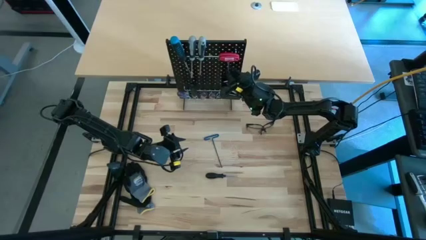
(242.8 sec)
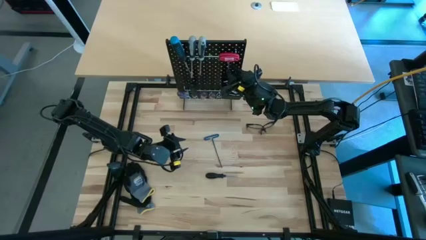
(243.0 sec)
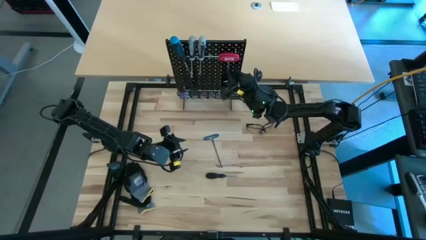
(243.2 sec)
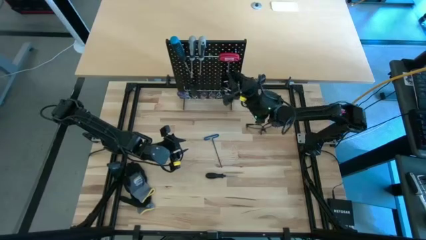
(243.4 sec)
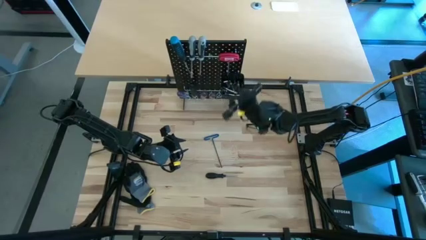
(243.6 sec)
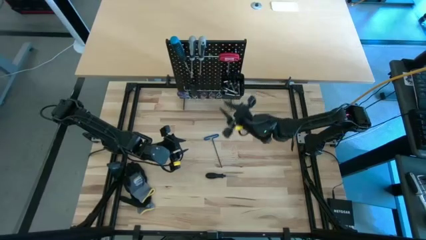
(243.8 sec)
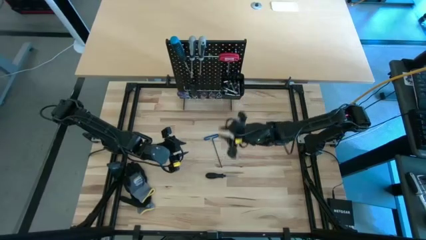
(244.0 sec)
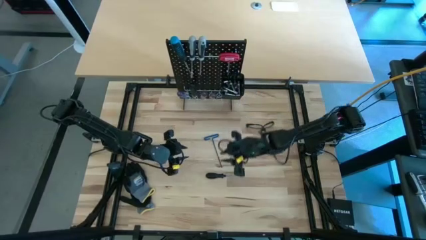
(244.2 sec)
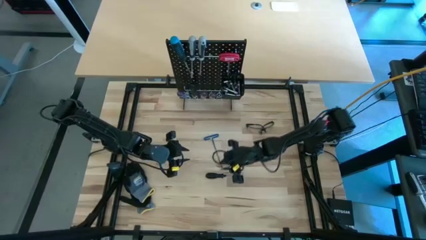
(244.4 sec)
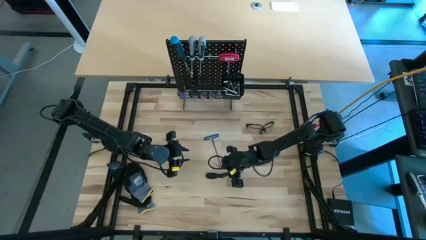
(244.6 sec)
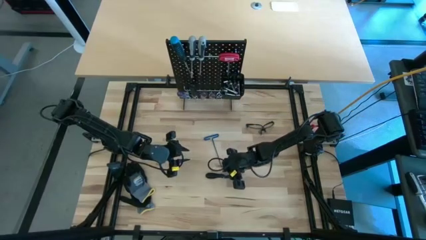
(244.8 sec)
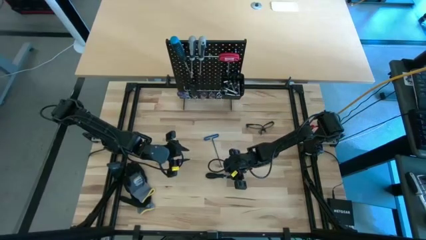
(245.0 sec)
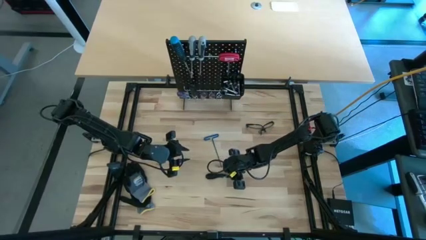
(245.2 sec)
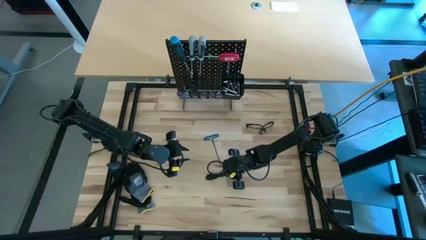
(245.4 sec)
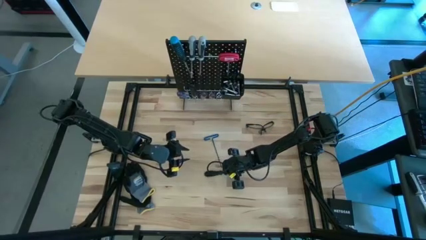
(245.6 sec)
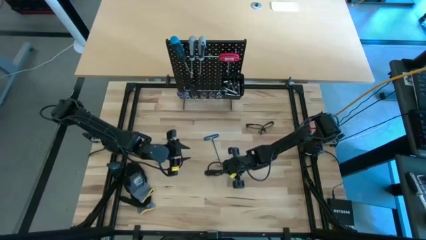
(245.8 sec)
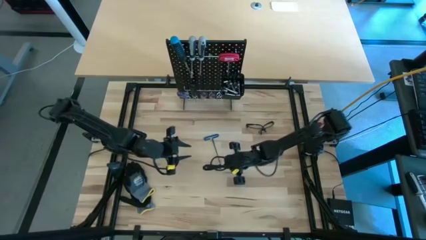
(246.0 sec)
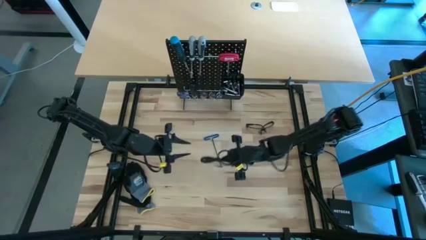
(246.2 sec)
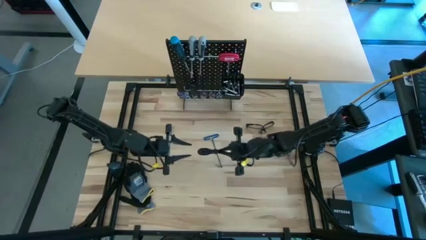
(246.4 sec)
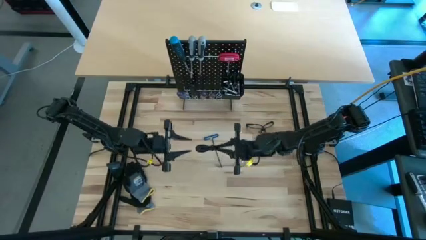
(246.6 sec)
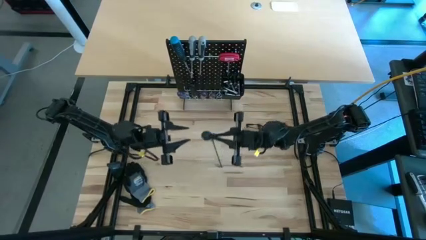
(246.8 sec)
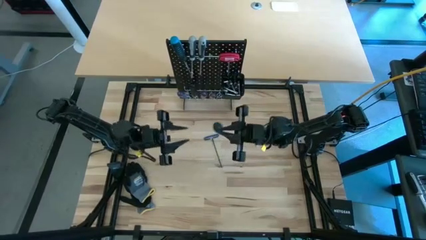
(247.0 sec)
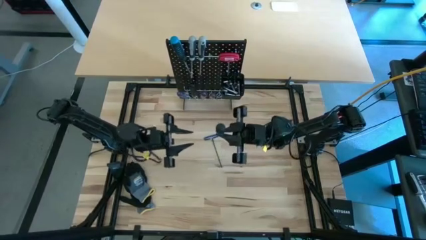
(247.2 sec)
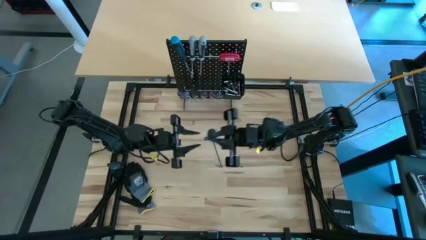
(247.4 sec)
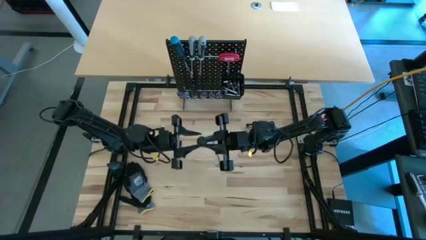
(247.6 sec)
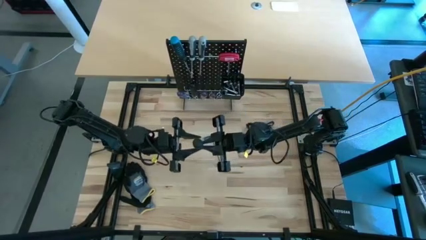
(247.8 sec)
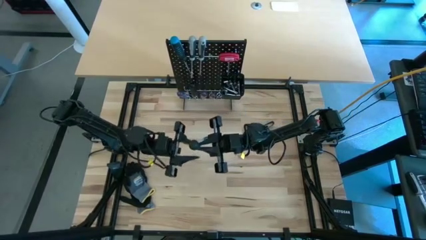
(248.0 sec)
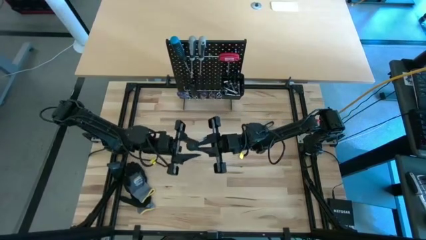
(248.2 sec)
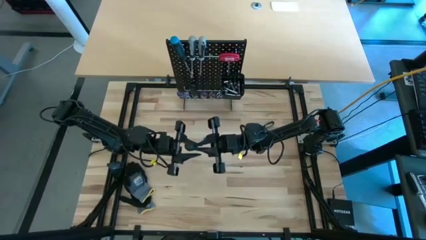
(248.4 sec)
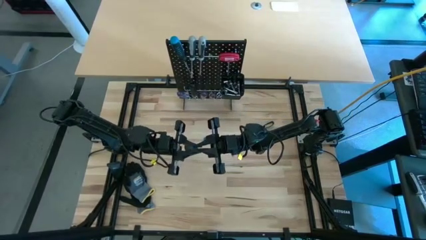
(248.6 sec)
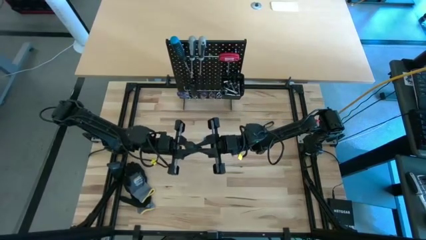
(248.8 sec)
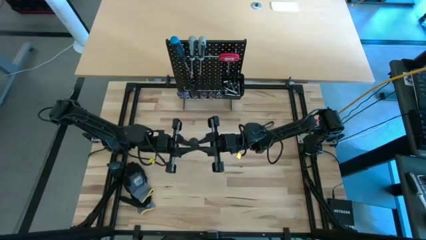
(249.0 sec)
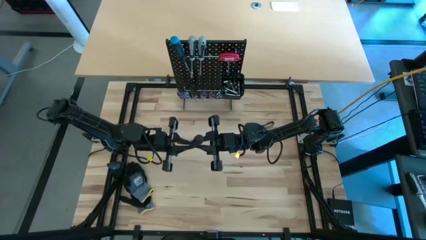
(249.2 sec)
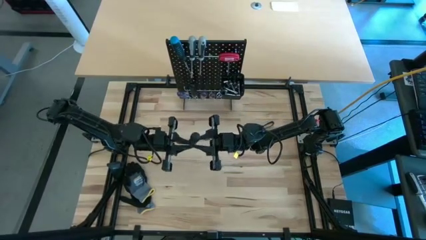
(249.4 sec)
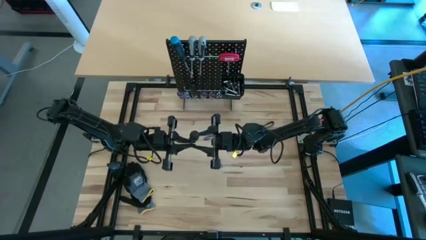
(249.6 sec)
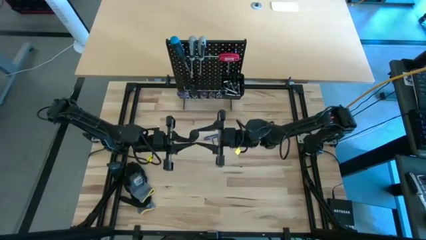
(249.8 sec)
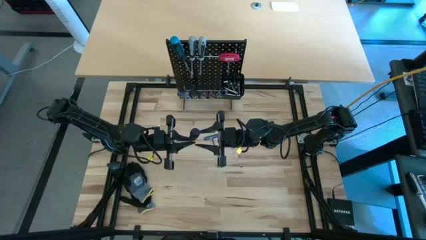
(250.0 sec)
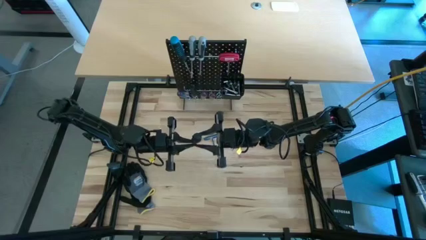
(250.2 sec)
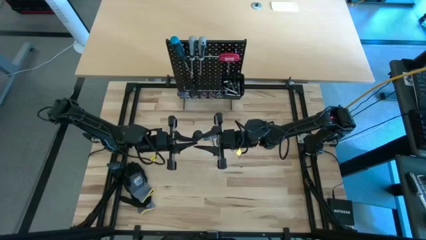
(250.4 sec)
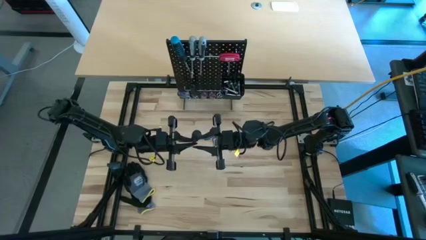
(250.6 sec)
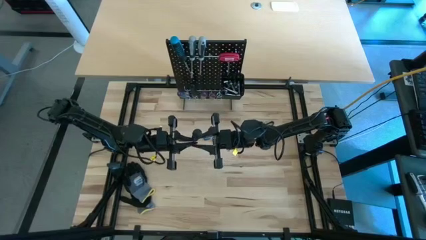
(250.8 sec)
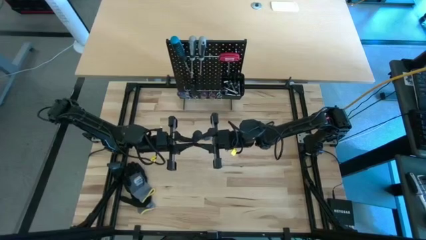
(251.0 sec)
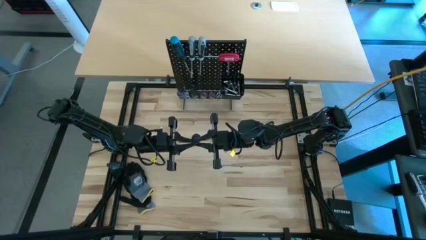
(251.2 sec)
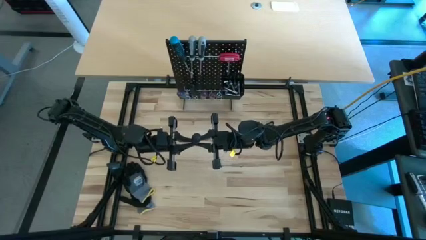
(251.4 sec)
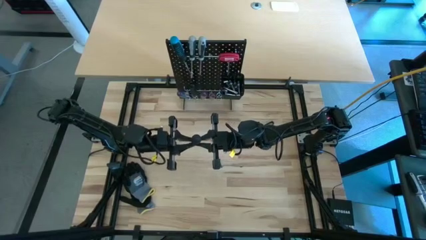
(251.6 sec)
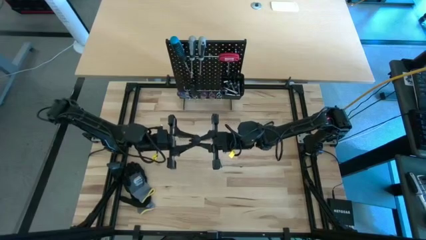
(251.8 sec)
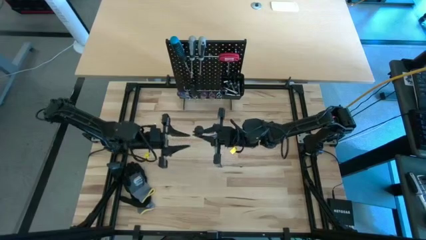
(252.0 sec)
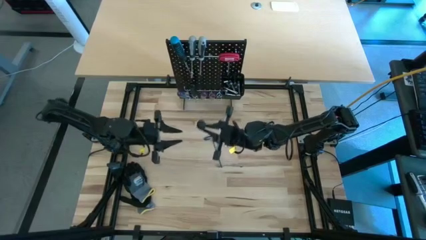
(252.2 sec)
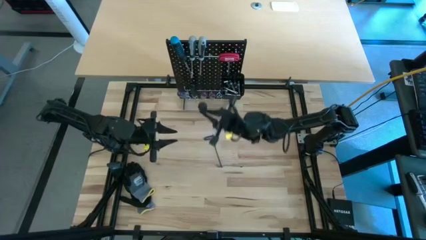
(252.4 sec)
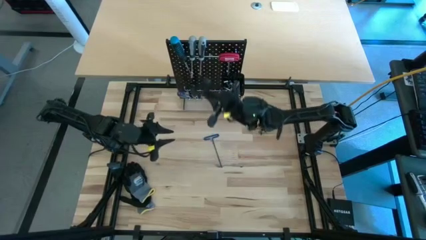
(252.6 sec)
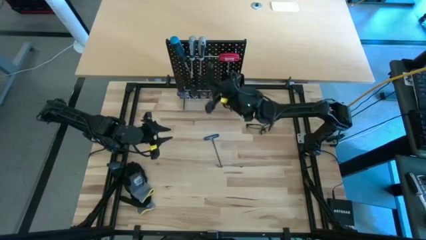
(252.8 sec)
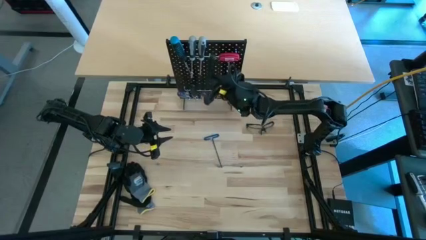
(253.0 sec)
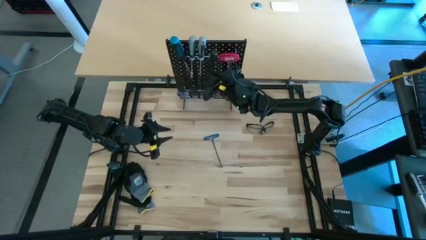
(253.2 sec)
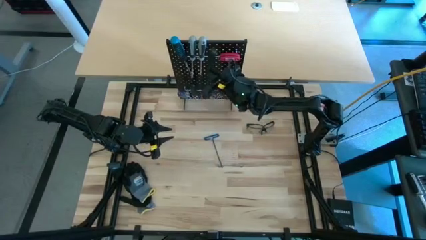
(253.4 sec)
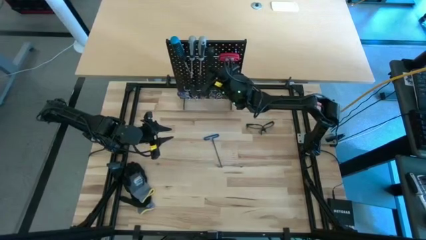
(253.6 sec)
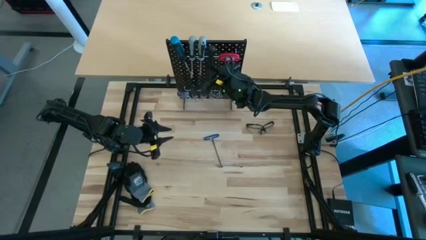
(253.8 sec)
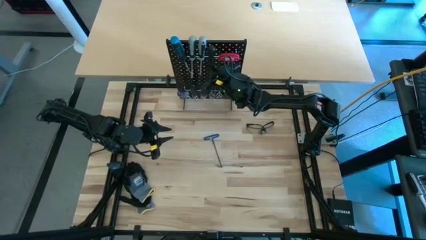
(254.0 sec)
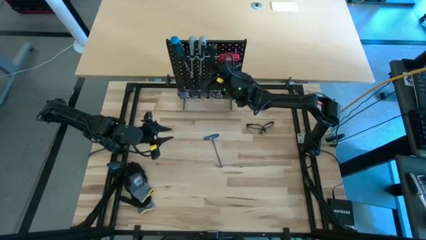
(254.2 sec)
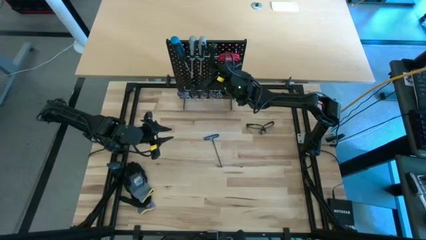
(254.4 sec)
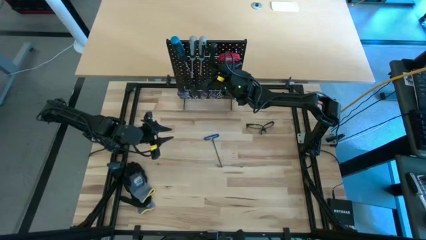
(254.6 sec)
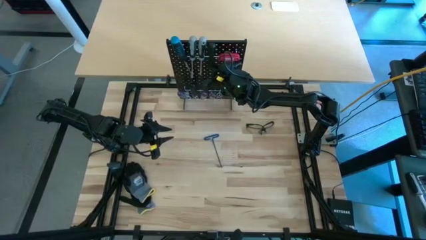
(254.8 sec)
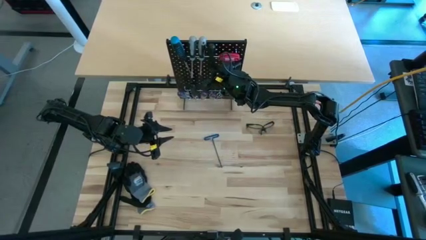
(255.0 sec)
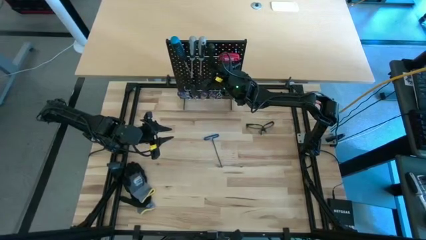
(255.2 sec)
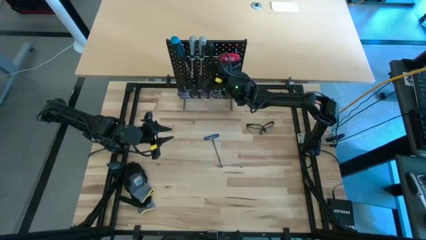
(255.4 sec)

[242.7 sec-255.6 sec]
Task: Hang tools onto peg board
Hang the black screwdriver on the peg board
